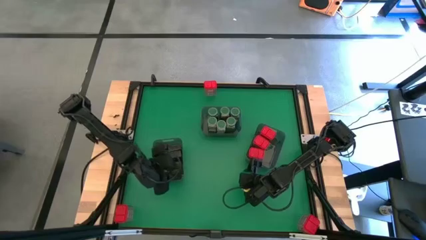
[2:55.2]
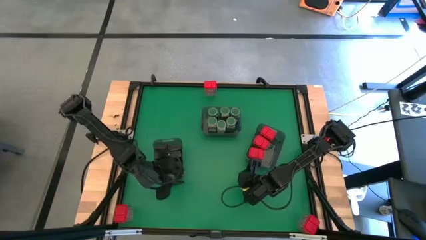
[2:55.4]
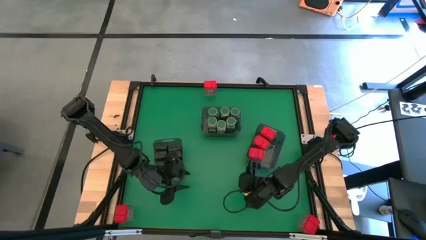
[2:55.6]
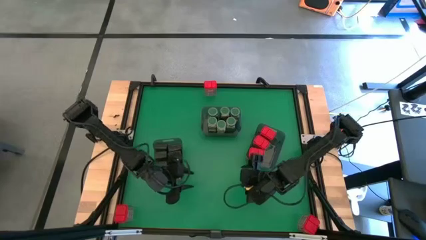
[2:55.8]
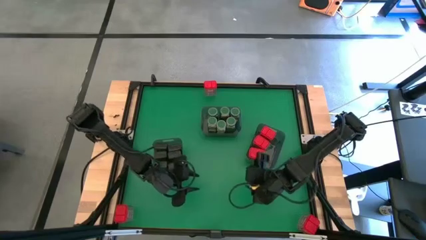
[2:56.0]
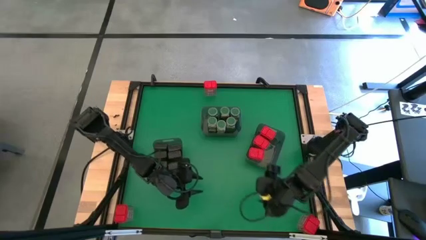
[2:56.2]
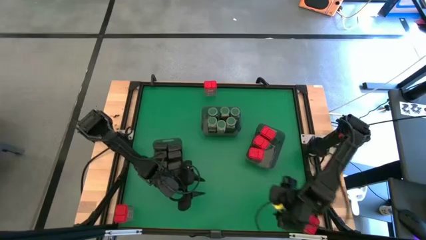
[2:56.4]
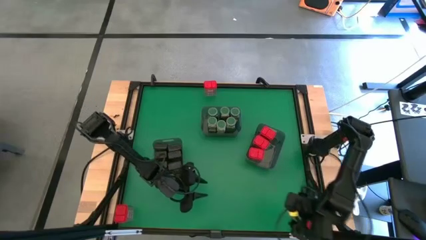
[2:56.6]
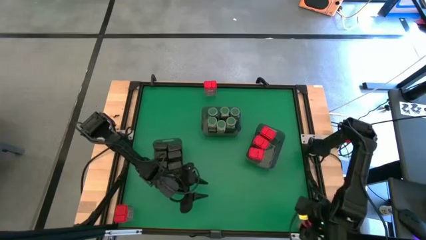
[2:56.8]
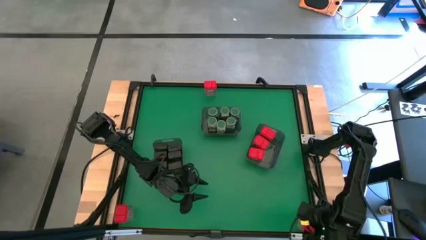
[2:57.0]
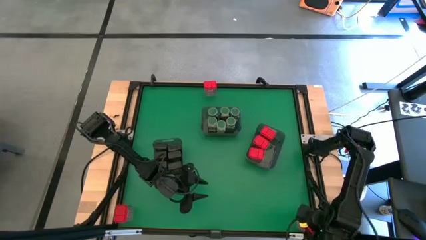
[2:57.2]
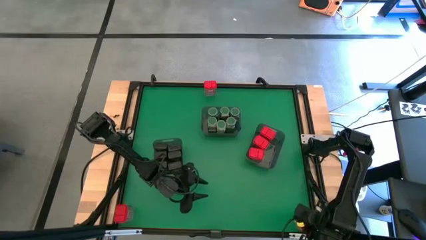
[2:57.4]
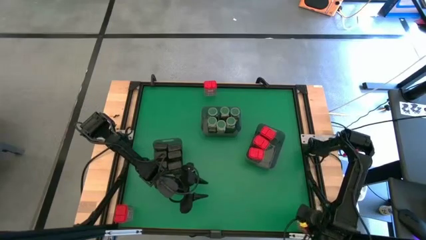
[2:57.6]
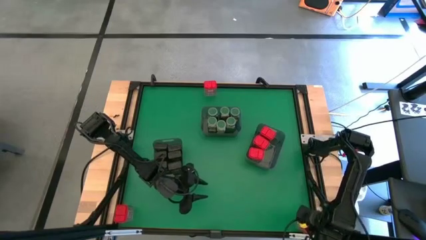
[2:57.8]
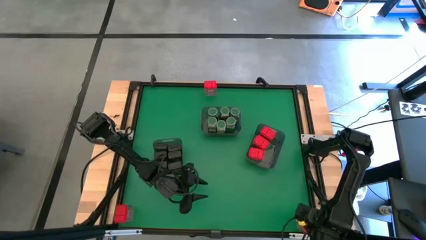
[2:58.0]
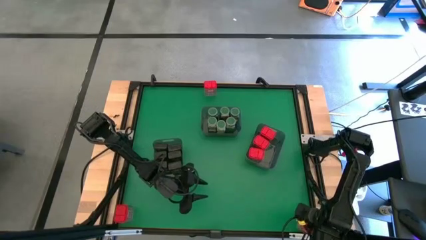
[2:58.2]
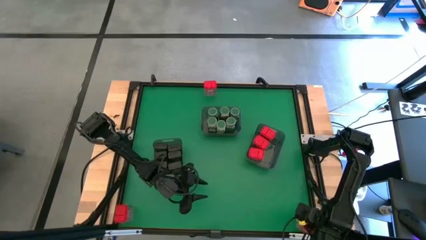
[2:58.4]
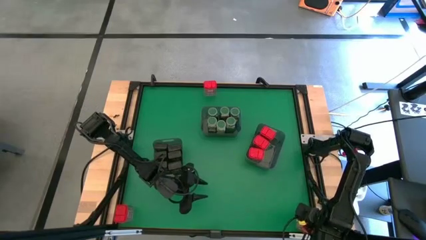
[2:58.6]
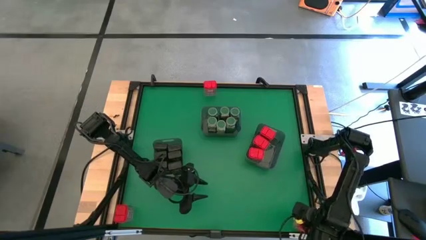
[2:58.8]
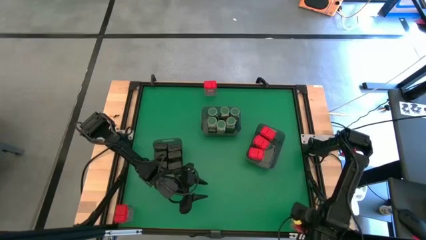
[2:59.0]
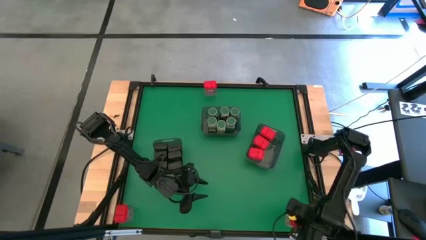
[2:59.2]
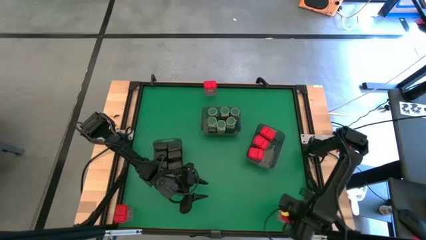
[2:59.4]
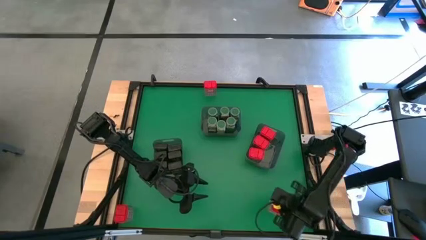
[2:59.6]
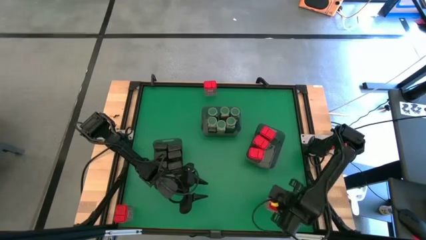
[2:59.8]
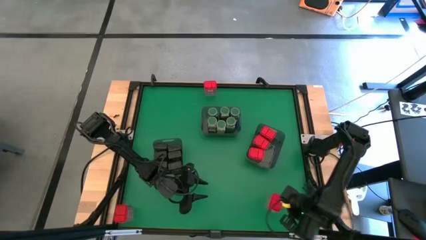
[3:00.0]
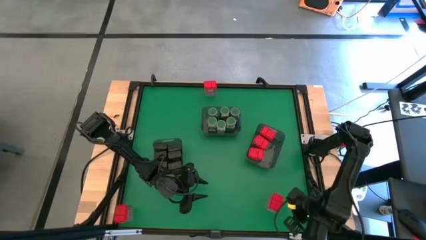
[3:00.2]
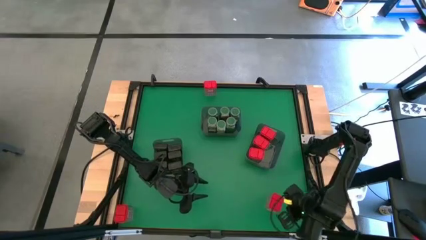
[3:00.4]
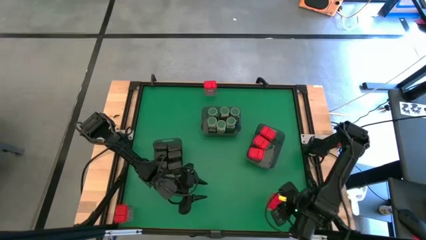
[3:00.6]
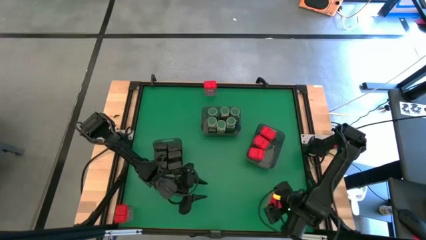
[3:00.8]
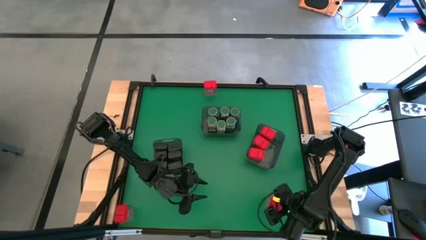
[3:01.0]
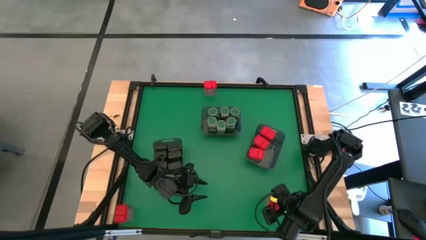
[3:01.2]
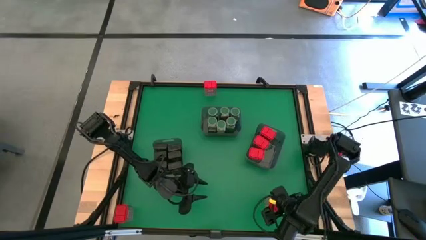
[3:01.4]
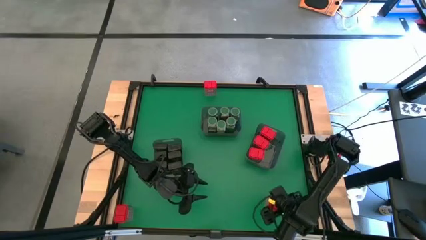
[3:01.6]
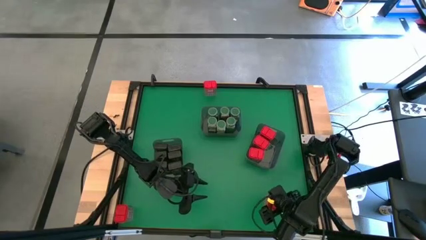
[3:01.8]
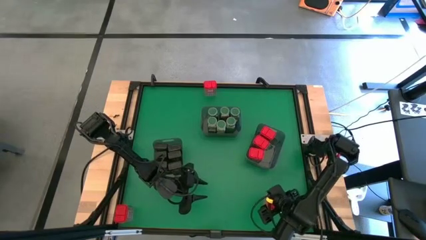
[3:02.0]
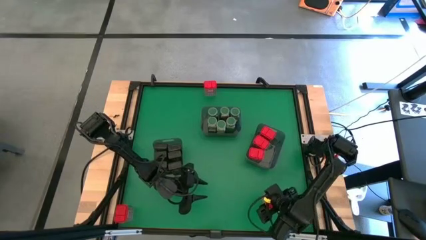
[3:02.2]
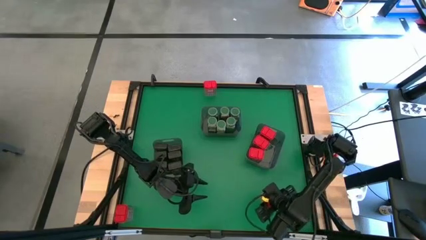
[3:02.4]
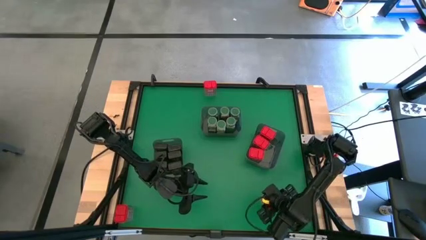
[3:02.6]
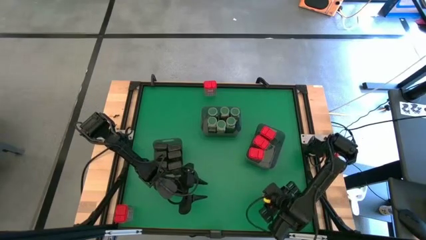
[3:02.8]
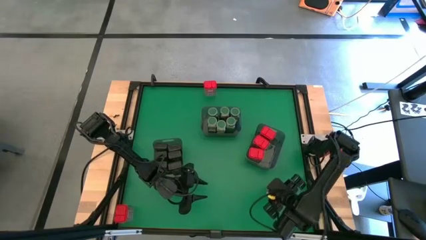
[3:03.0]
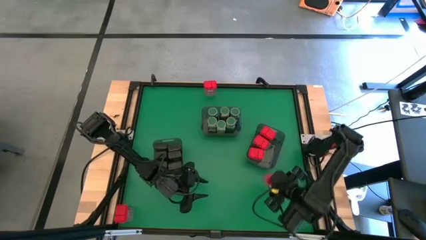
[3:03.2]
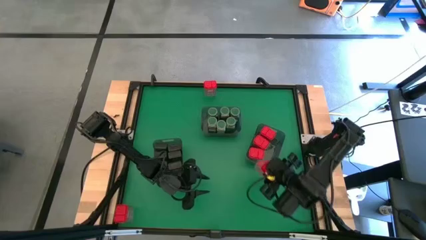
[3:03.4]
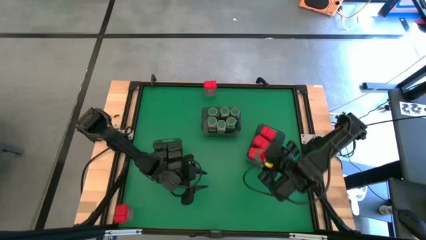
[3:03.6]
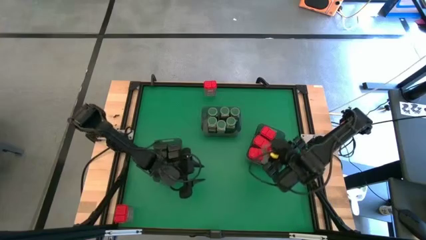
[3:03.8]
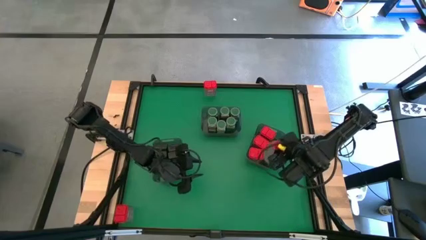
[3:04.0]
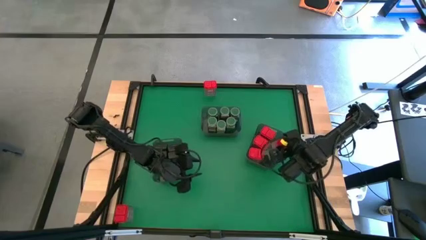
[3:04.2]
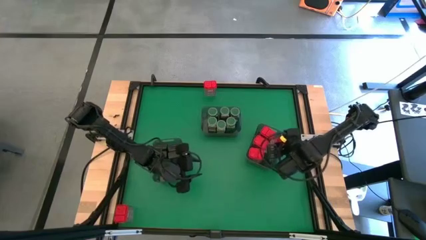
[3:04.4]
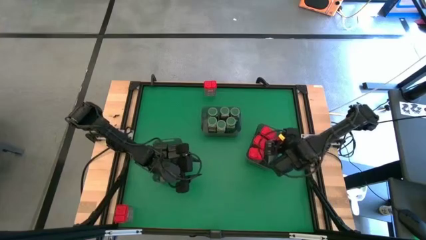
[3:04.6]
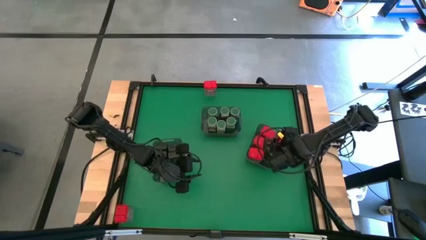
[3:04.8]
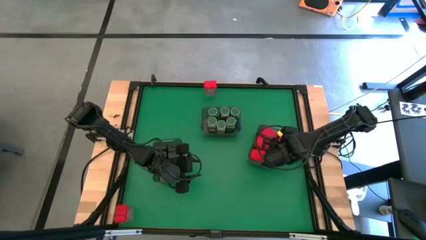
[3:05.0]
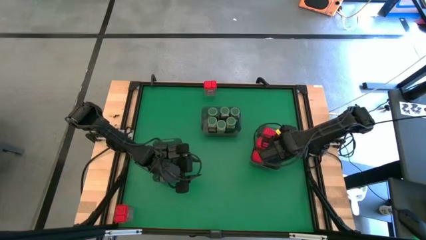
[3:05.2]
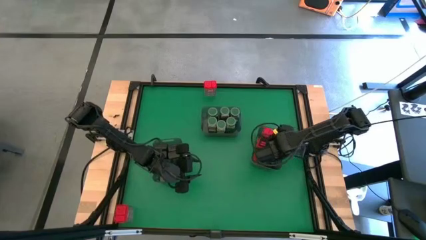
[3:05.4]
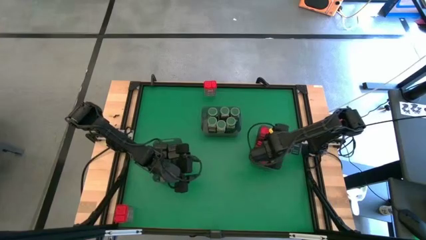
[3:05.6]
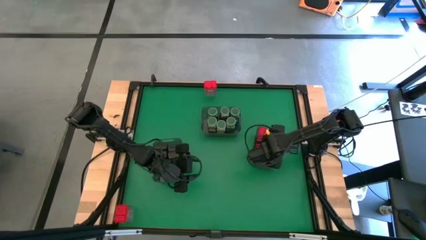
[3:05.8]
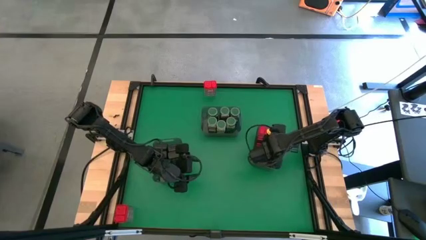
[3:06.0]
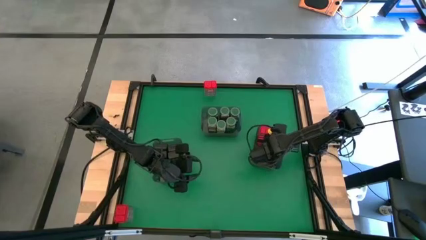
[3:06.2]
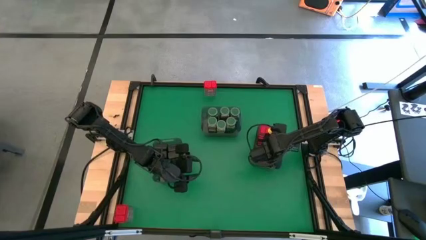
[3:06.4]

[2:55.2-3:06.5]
Task: Sort spices by type
Put the red seasoning can into the right black bin

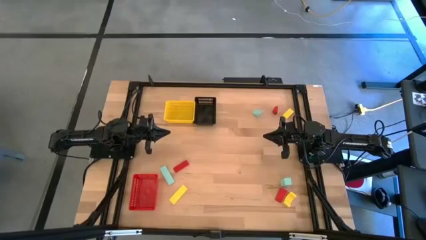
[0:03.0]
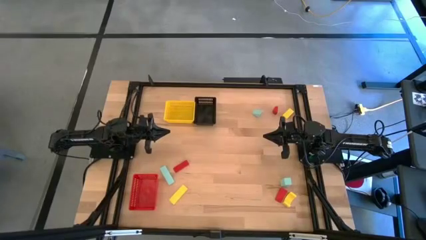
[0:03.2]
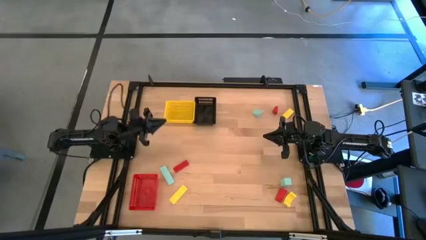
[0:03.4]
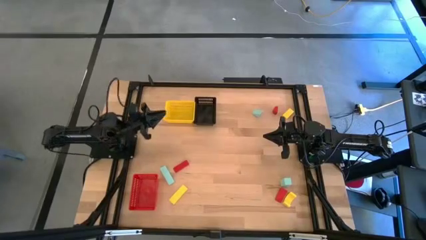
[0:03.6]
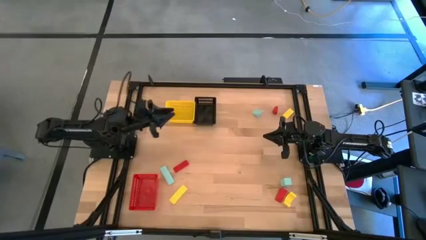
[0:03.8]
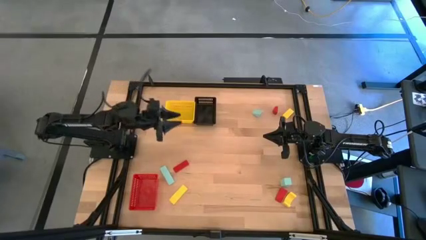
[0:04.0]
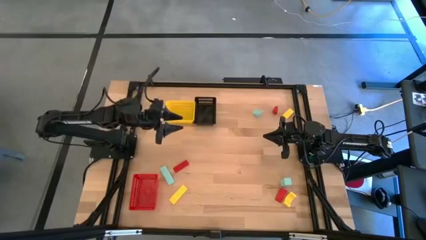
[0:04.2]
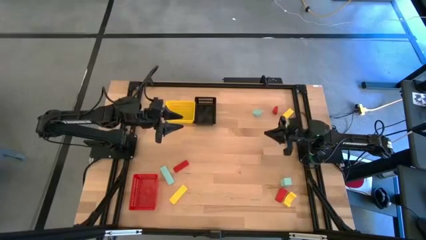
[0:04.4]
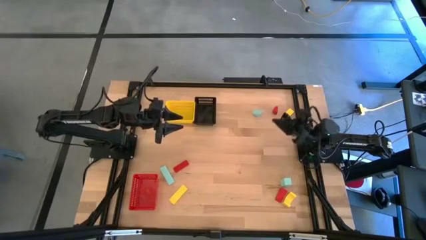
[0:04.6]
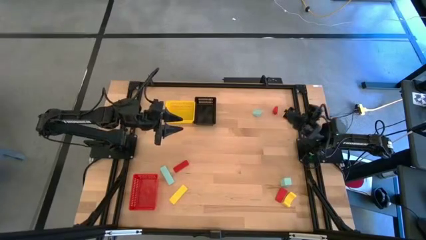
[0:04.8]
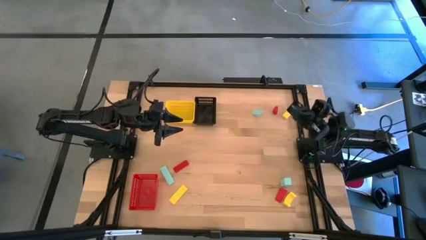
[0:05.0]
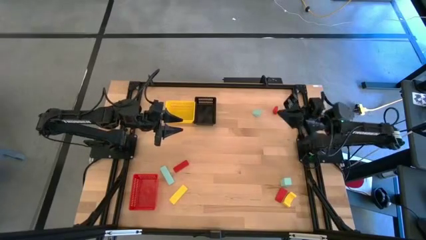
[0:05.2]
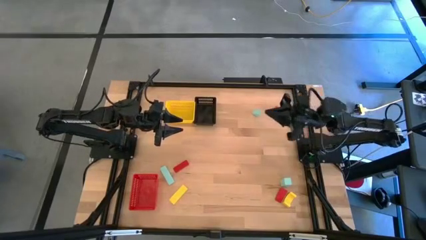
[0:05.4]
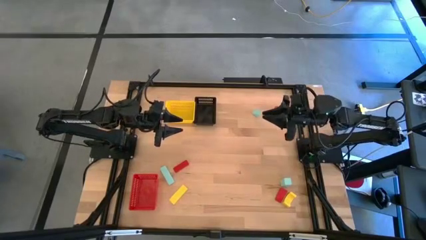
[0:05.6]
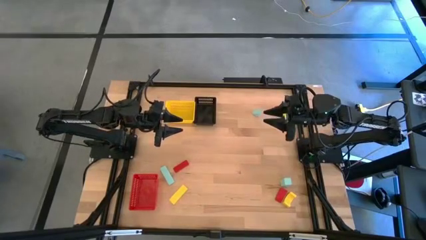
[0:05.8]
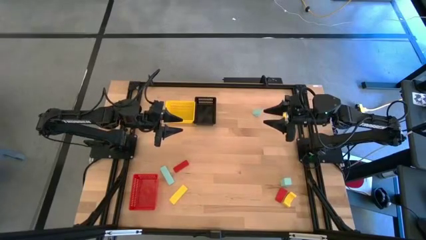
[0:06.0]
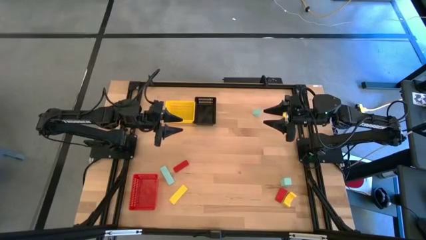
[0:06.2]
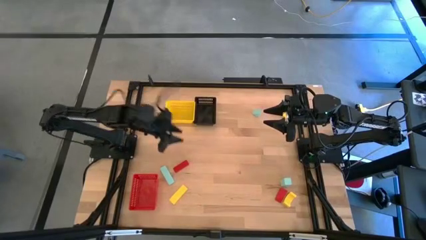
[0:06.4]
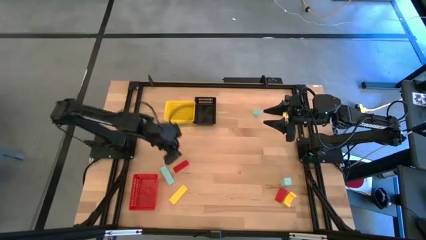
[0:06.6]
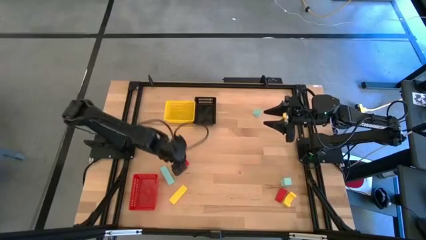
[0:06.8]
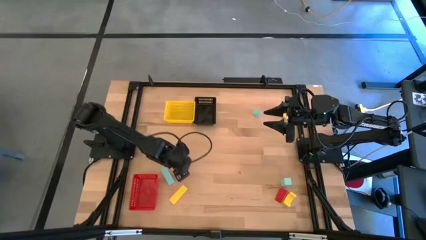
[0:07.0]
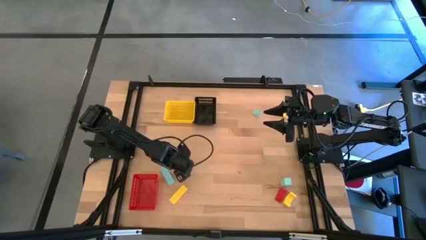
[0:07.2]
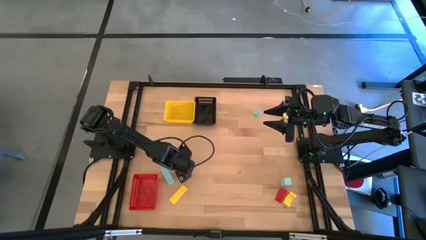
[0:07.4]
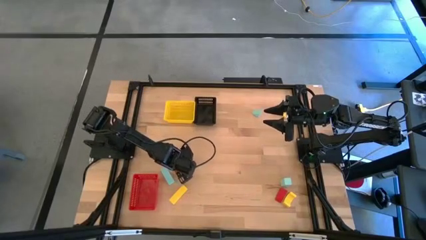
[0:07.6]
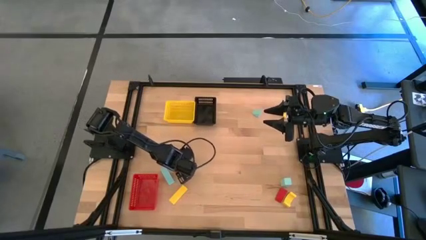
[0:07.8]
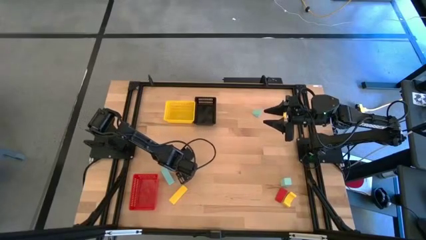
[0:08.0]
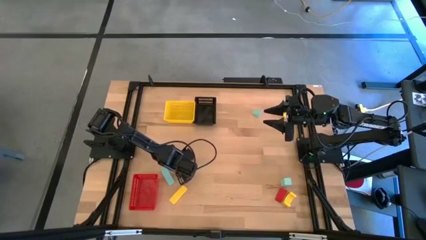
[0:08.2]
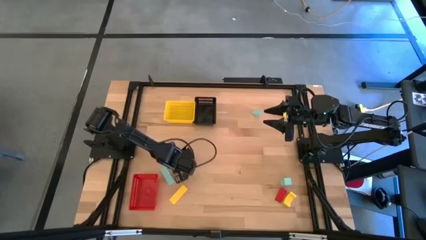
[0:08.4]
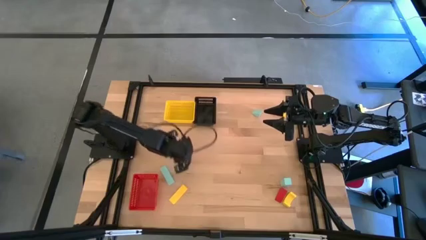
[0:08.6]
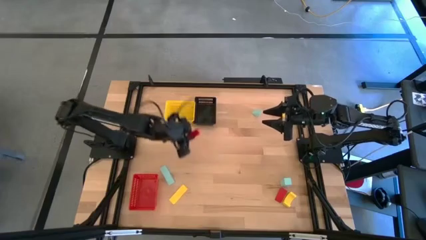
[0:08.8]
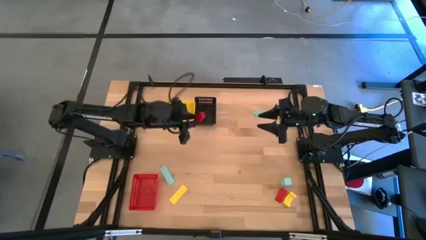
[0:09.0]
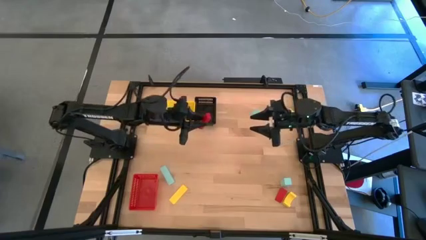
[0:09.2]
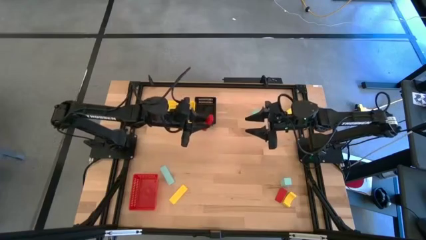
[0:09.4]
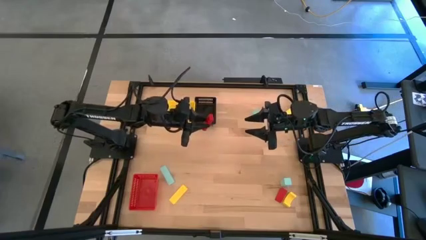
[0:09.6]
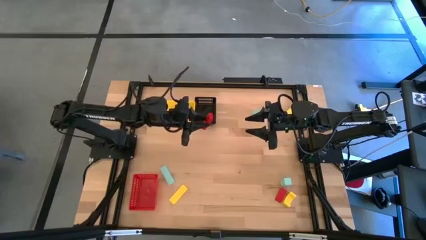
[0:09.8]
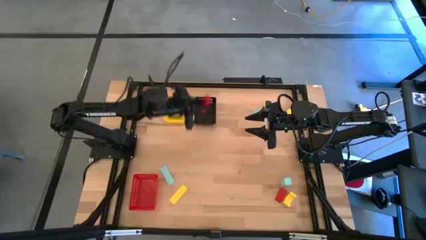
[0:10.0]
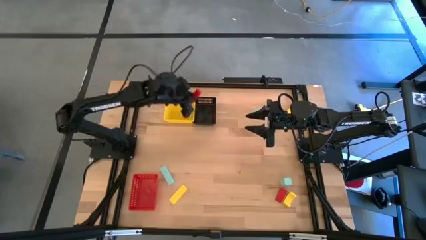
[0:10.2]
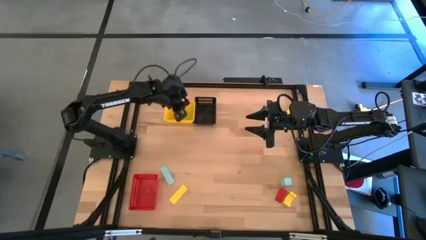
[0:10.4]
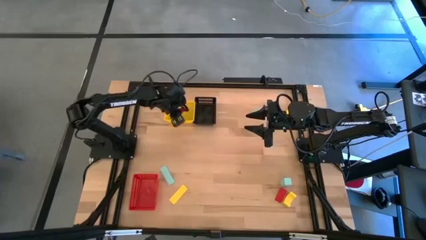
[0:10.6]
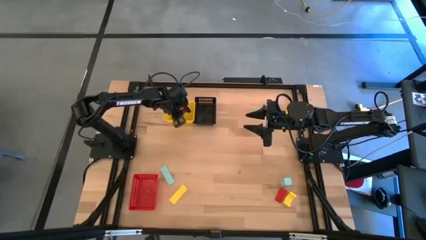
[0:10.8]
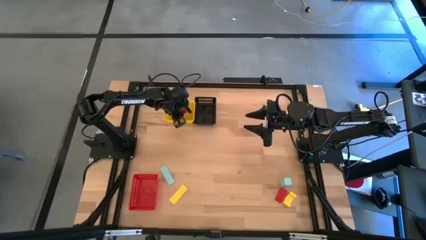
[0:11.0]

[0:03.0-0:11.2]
Task: Sort & place blocks by color
Put the middle red block into the yellow basket
